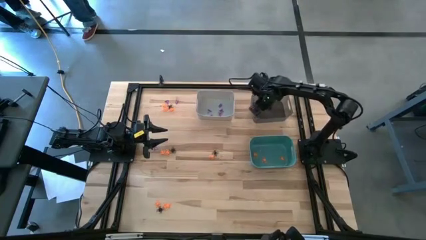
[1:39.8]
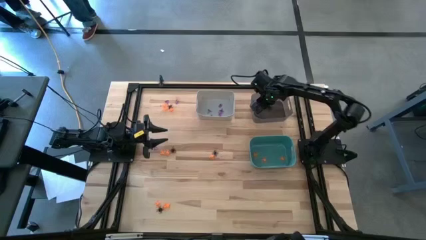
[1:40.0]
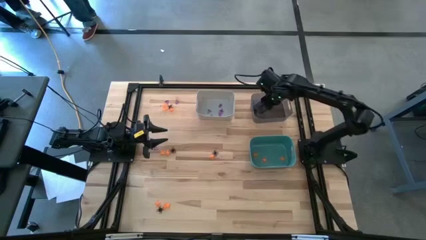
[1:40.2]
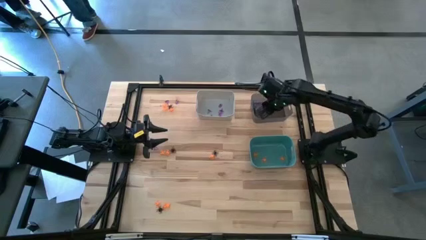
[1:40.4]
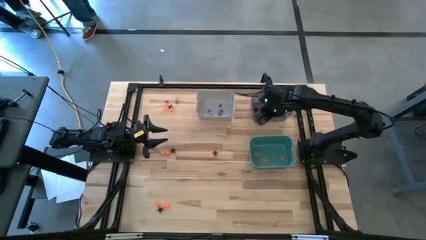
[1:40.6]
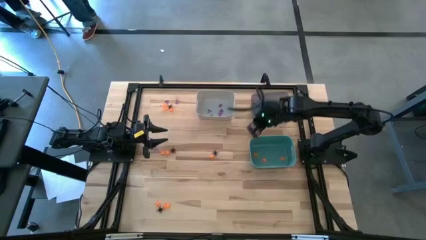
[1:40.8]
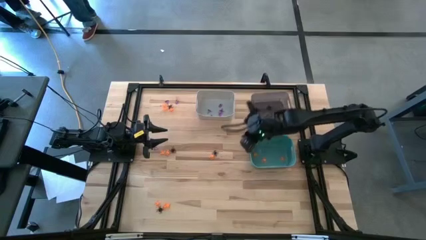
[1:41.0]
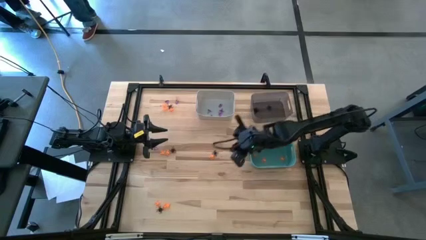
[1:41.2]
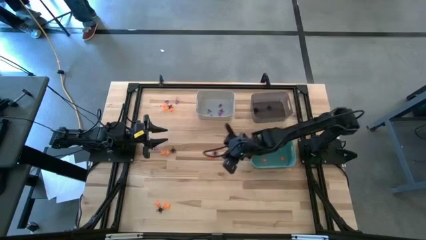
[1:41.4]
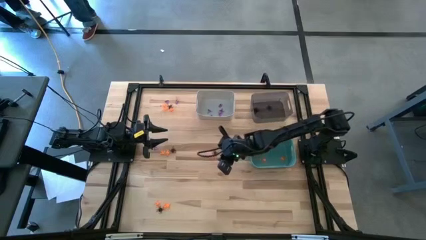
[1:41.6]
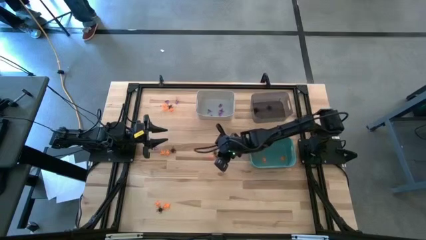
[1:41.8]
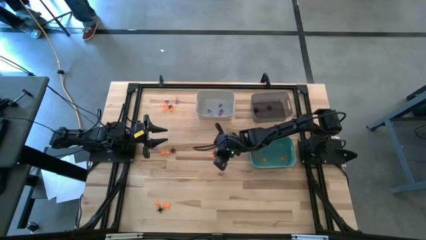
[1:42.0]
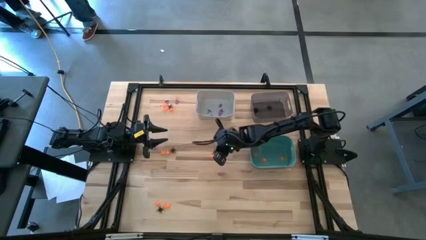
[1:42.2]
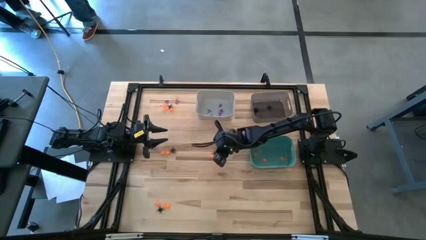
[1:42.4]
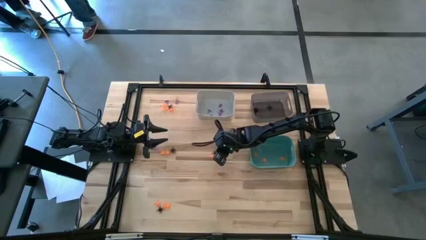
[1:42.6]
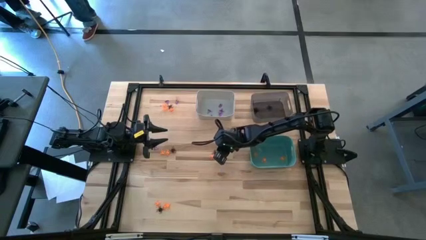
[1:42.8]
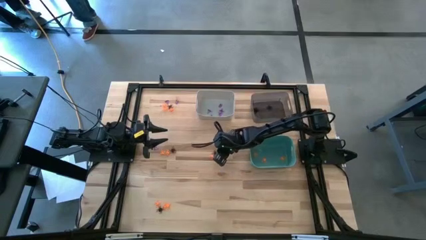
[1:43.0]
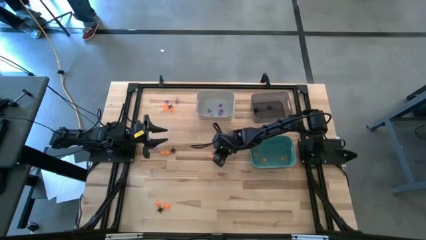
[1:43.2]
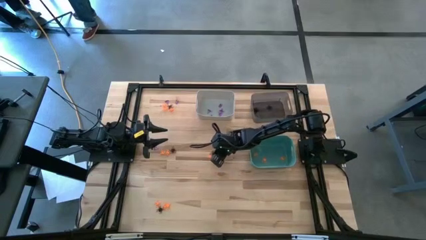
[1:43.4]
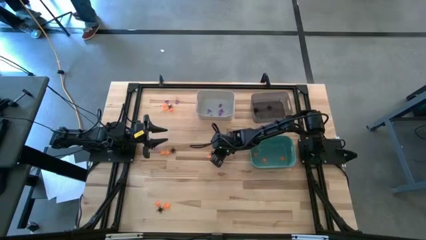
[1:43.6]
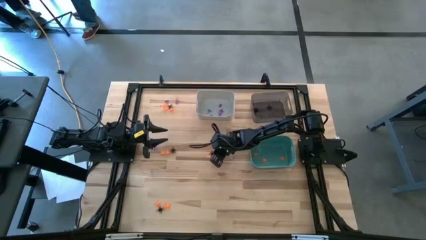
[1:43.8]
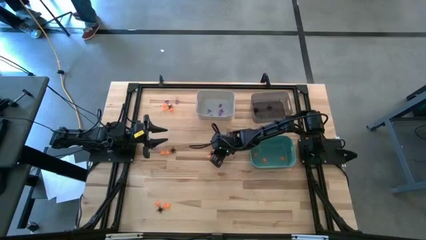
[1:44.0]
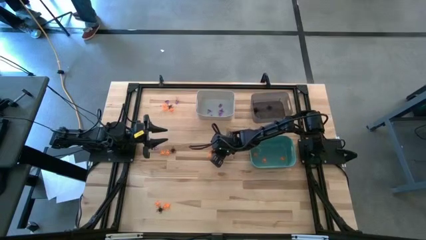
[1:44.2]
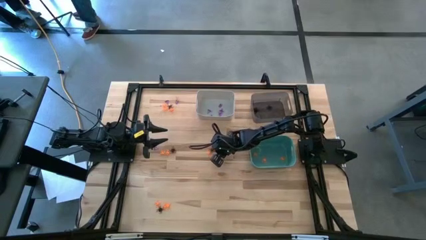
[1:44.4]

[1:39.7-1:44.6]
Task: Sort Halloween decoration
Put the black spider toy into the black bin

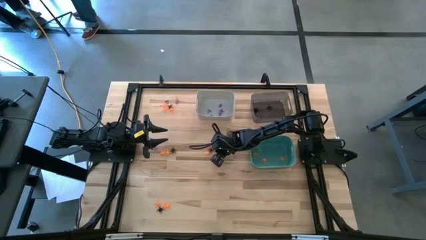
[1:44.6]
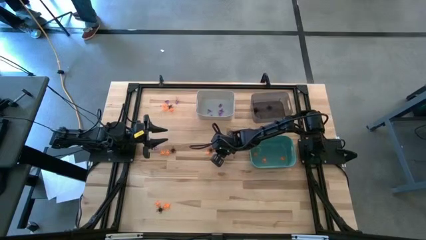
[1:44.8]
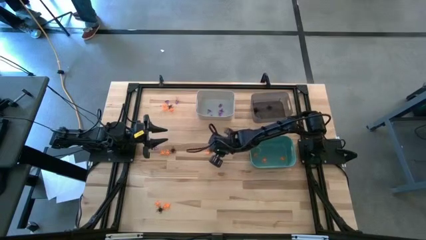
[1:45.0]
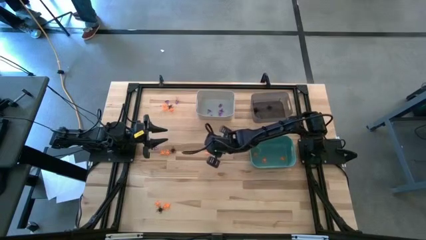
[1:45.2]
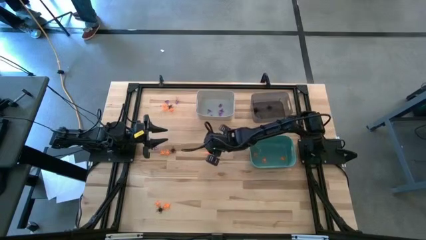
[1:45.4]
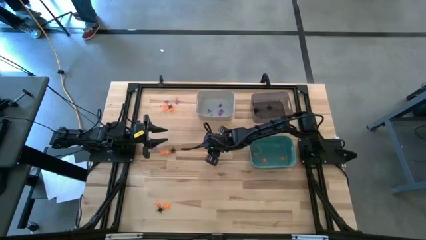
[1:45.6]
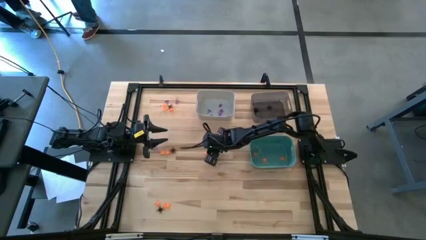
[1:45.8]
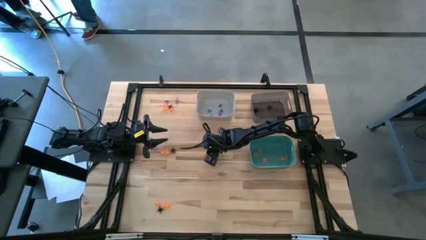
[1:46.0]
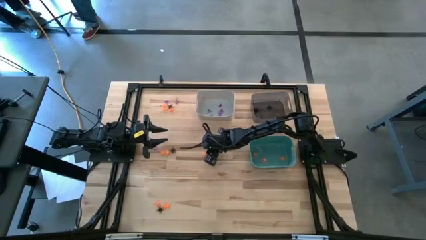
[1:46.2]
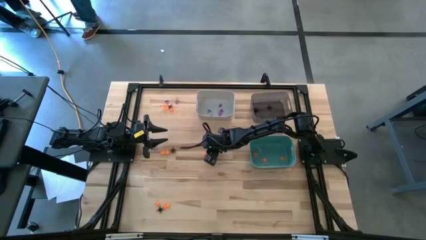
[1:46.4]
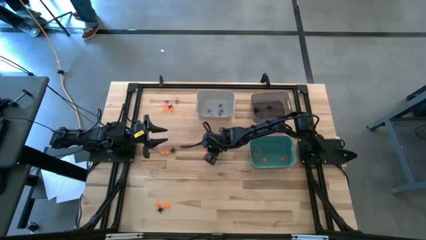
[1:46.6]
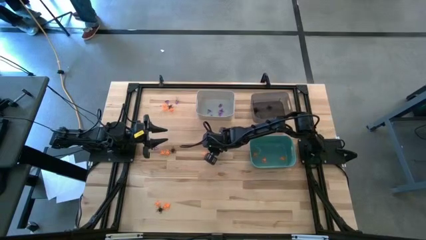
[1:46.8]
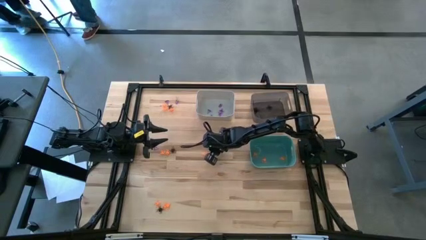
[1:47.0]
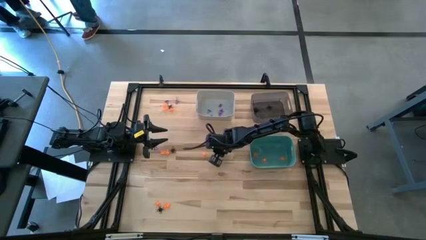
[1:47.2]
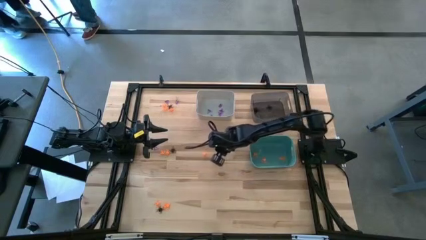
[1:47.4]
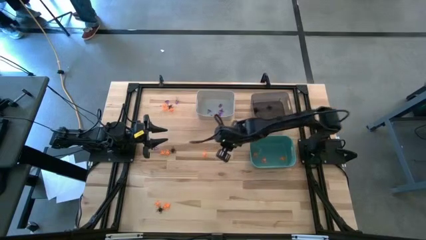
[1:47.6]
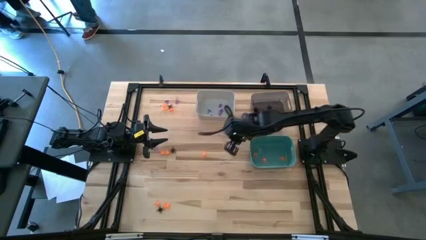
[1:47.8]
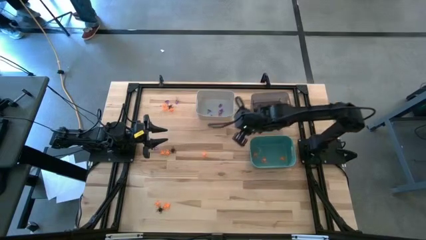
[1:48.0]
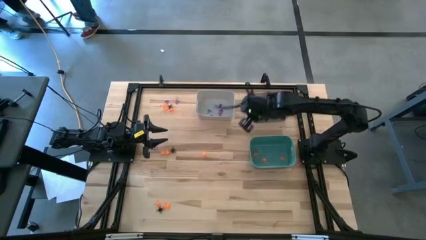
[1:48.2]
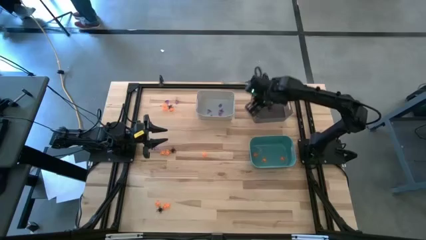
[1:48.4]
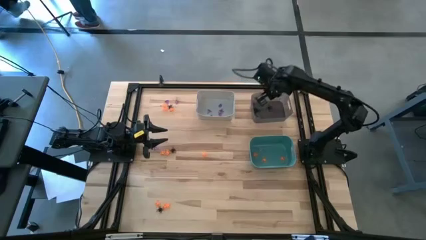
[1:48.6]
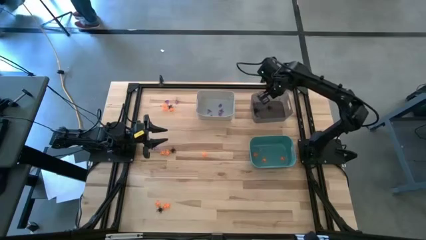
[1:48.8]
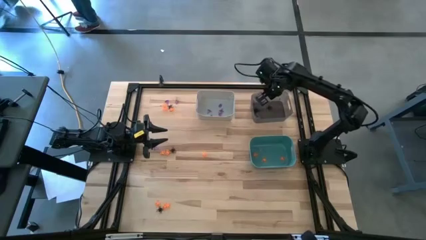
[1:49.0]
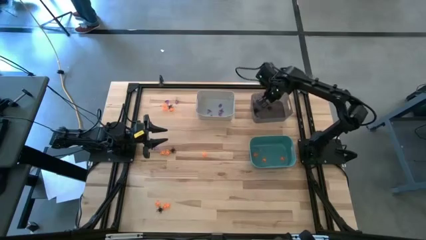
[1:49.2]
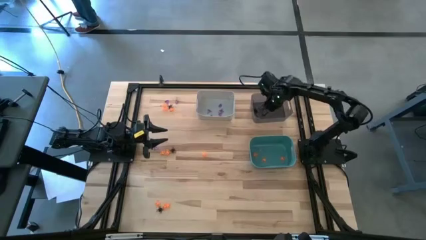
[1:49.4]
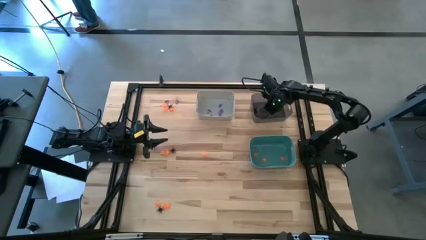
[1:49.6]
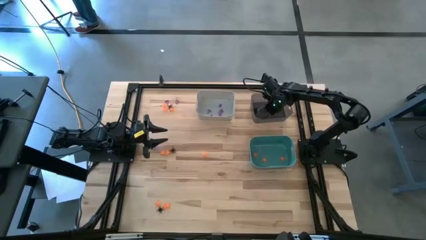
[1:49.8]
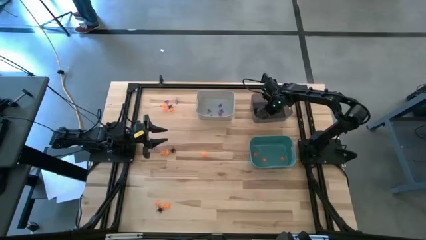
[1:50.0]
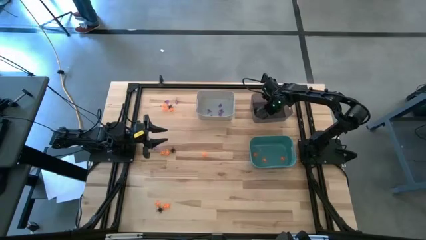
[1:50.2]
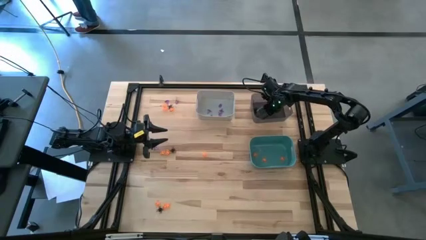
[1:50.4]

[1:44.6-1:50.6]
Put the black spider toy into the black bin

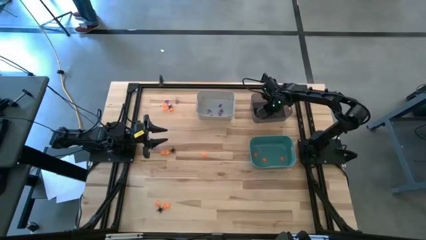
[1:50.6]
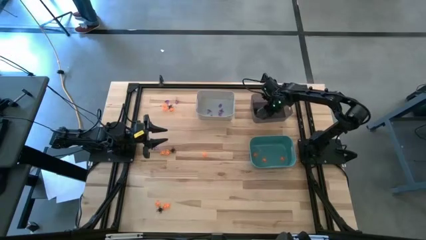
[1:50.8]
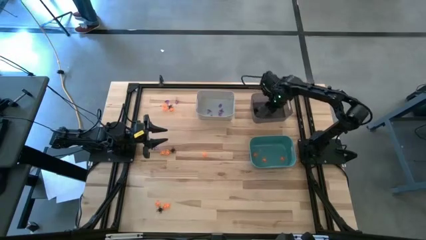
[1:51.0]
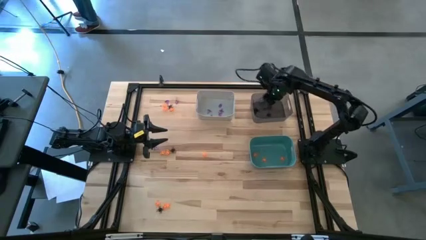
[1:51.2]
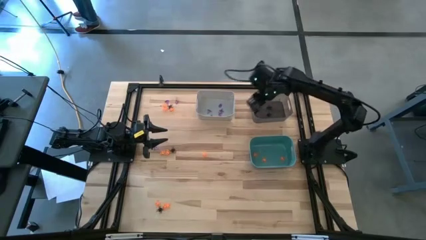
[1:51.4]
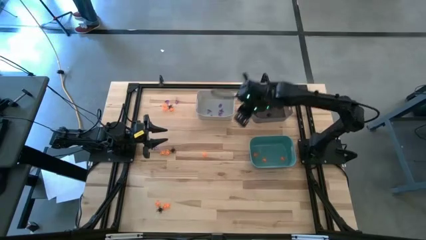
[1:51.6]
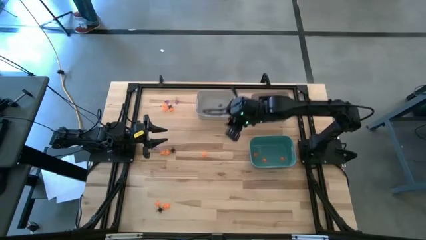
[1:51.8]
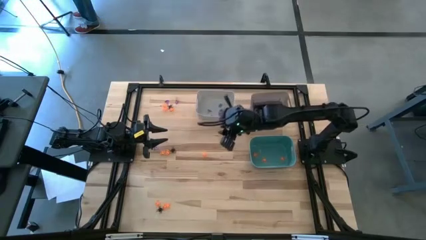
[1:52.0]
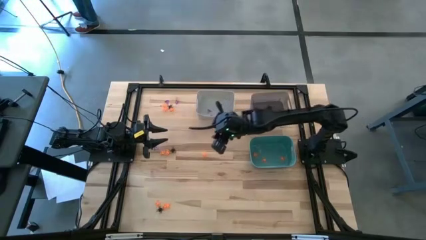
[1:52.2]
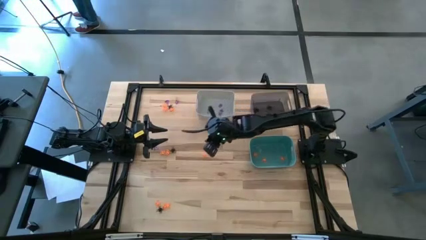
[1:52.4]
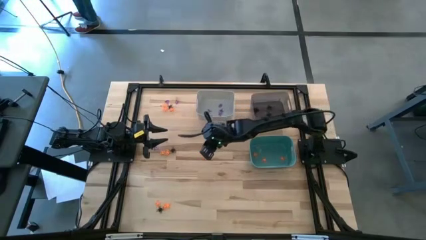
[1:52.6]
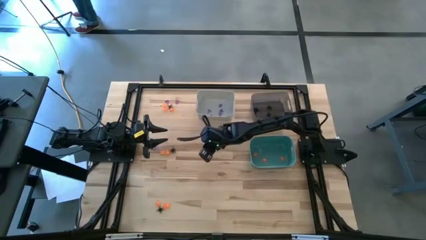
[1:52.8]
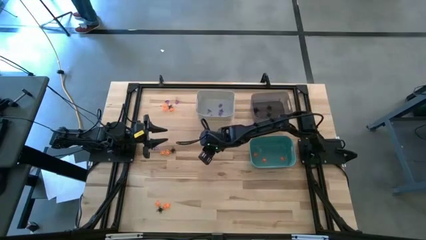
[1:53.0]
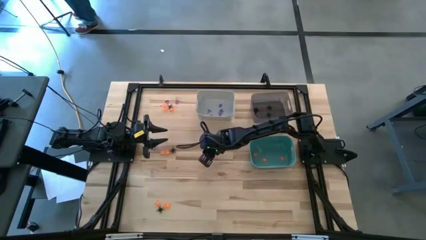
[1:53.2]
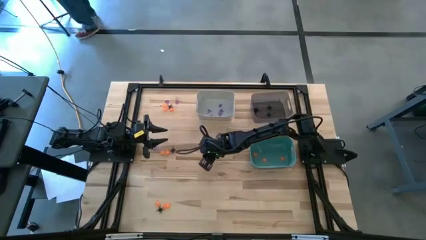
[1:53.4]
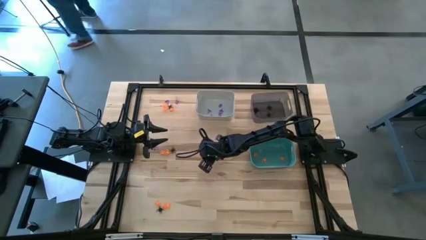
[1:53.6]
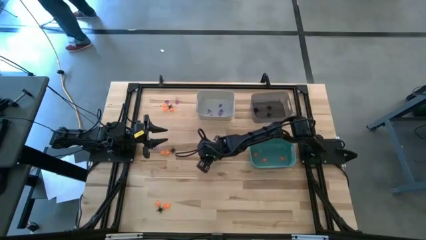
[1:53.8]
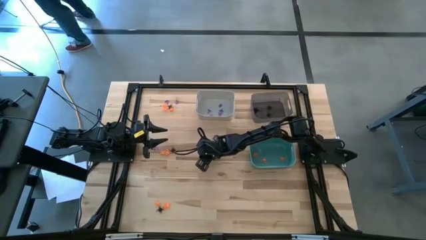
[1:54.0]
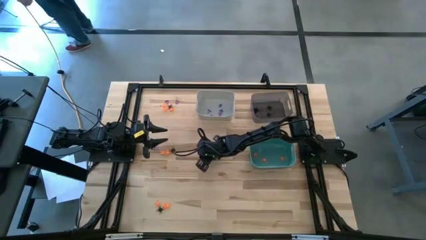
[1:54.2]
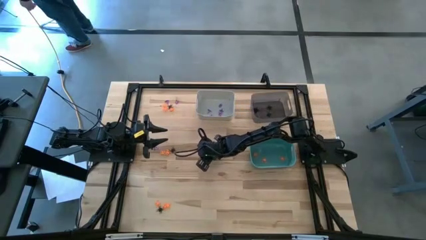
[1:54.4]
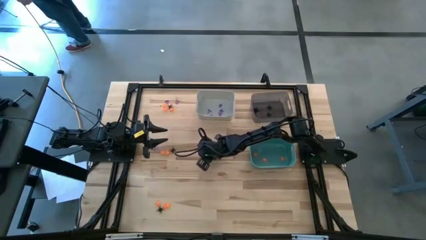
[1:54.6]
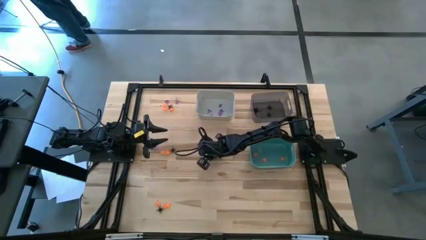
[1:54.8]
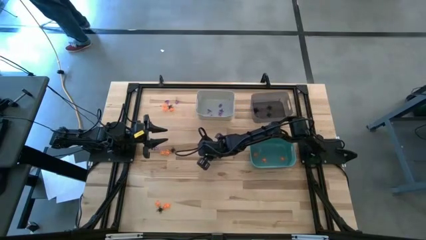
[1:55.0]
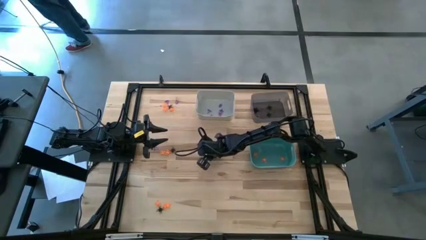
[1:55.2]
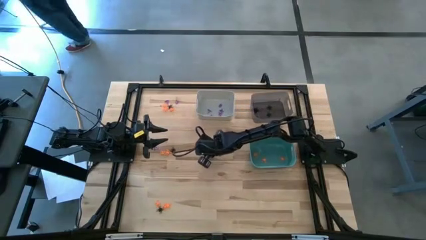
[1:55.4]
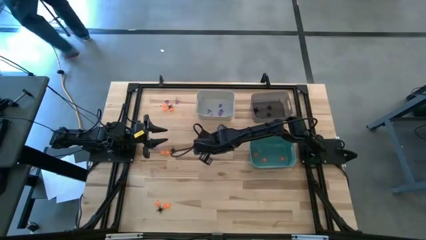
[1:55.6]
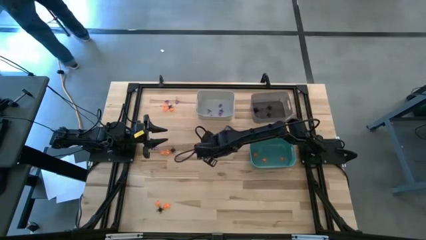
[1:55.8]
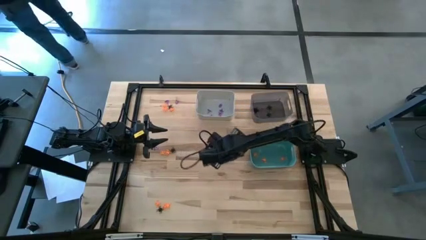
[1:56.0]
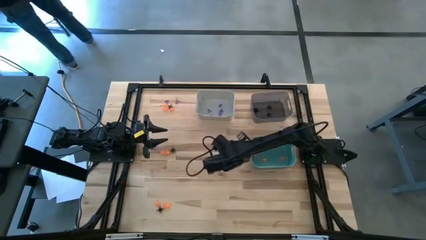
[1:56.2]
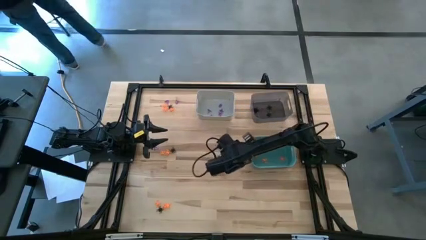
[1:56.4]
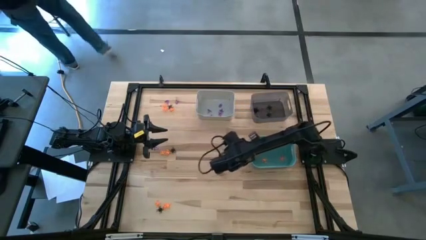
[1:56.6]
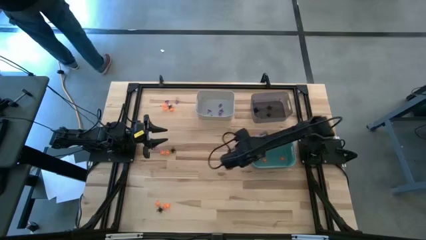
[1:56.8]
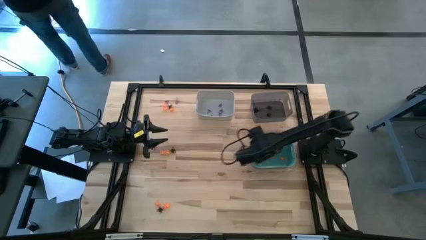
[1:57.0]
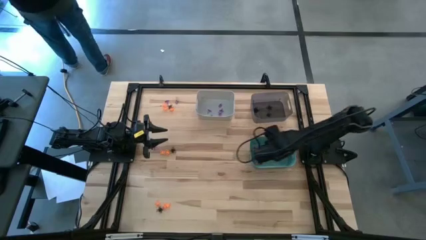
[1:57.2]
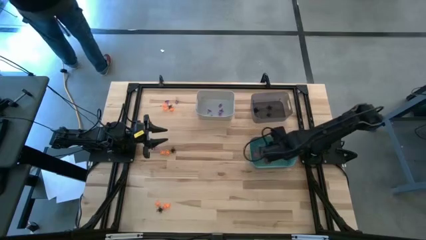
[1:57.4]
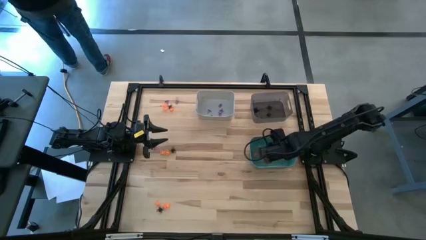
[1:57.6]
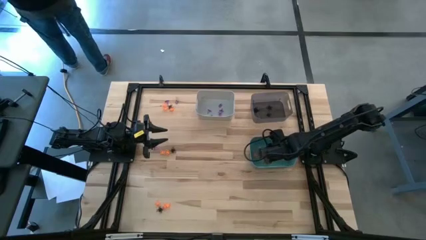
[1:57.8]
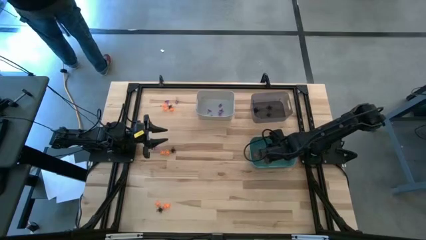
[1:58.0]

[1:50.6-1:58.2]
Put the orange spider toy into the green bin
